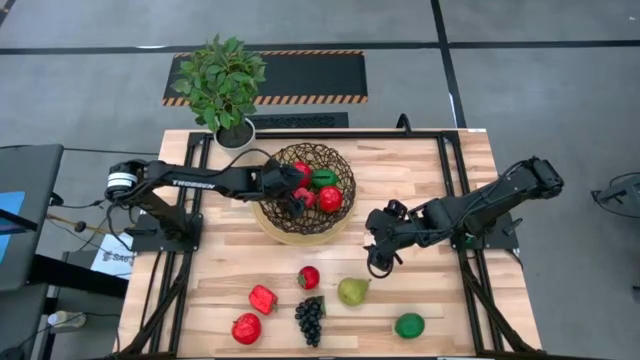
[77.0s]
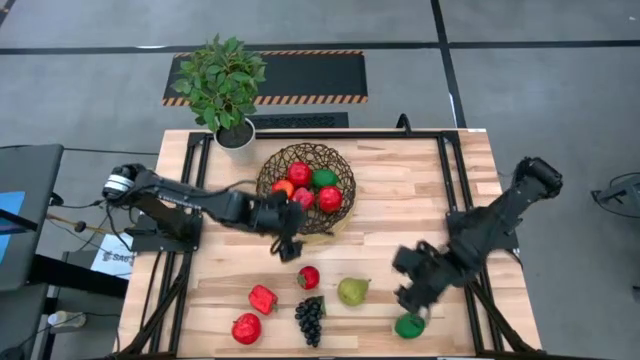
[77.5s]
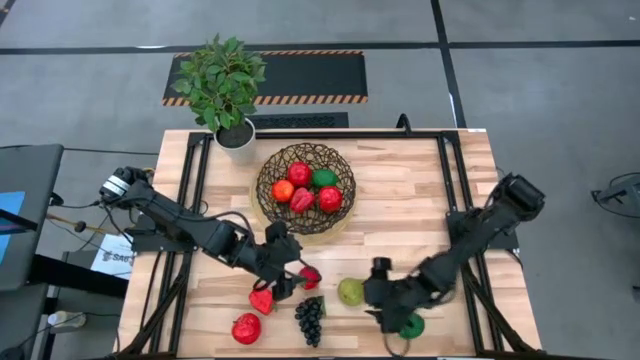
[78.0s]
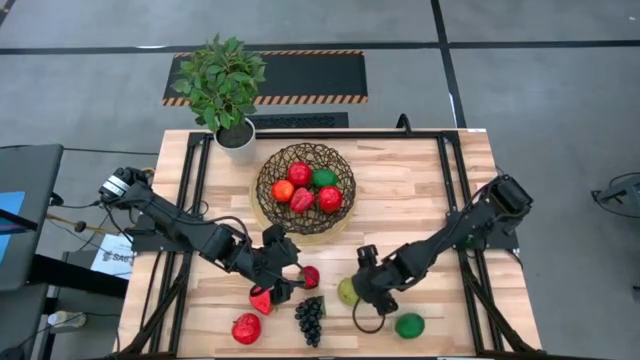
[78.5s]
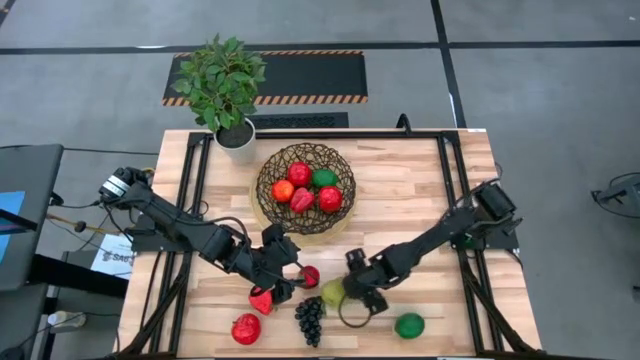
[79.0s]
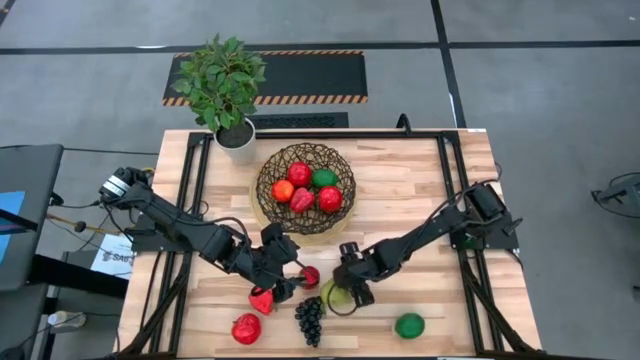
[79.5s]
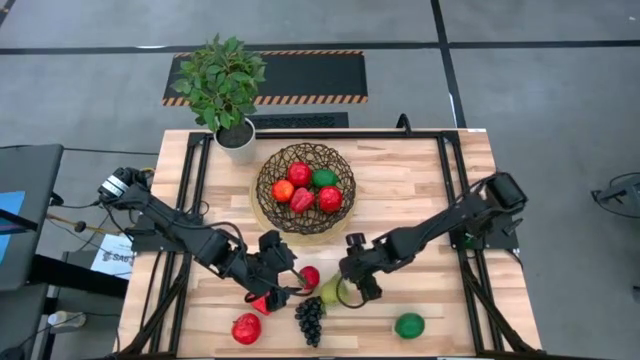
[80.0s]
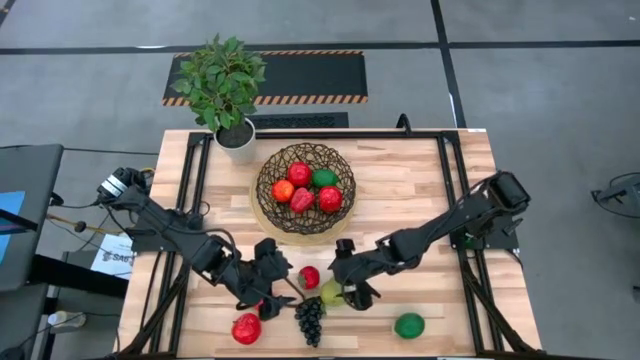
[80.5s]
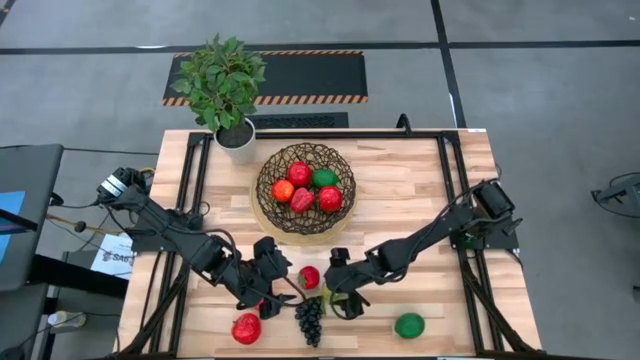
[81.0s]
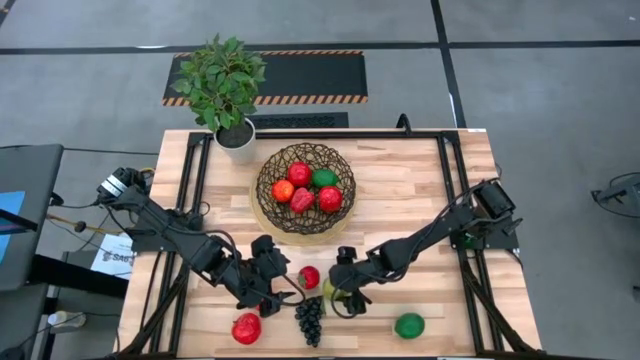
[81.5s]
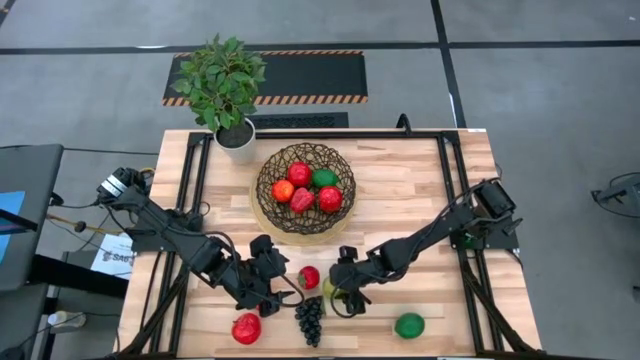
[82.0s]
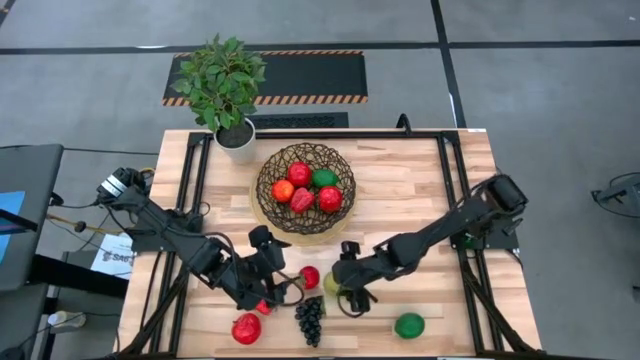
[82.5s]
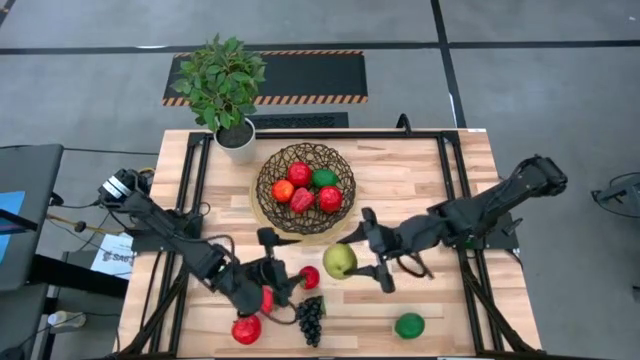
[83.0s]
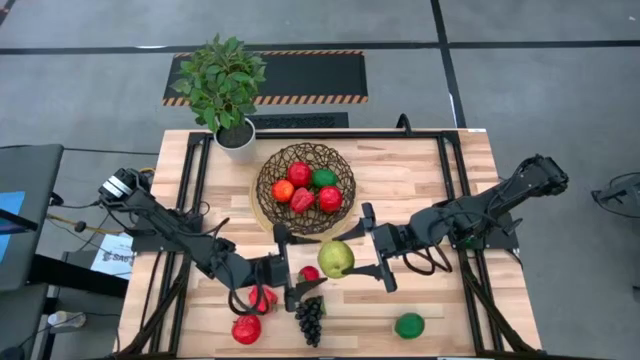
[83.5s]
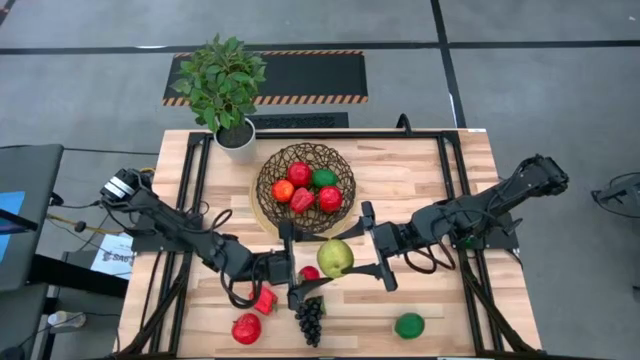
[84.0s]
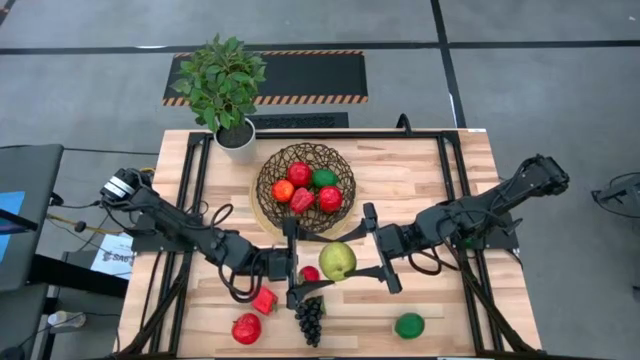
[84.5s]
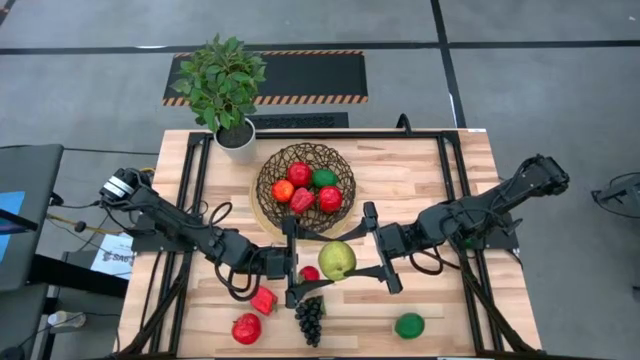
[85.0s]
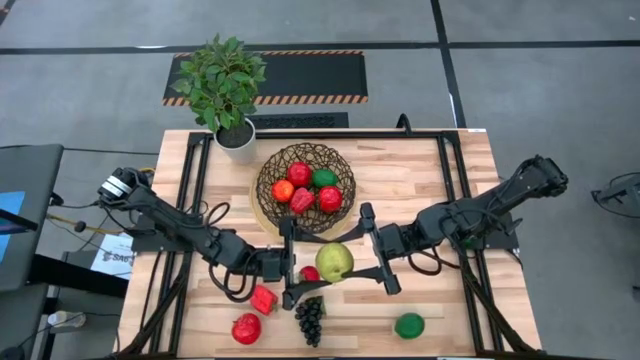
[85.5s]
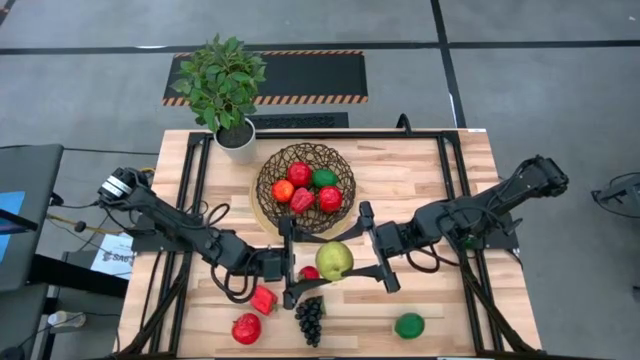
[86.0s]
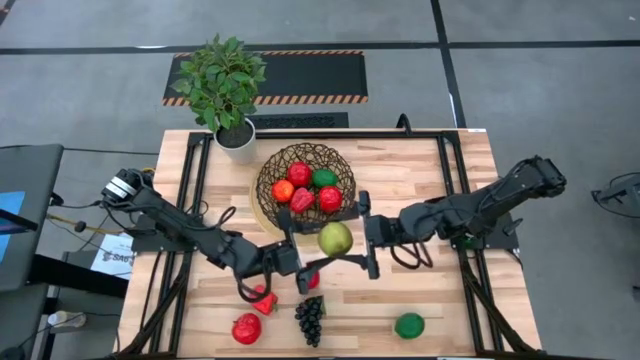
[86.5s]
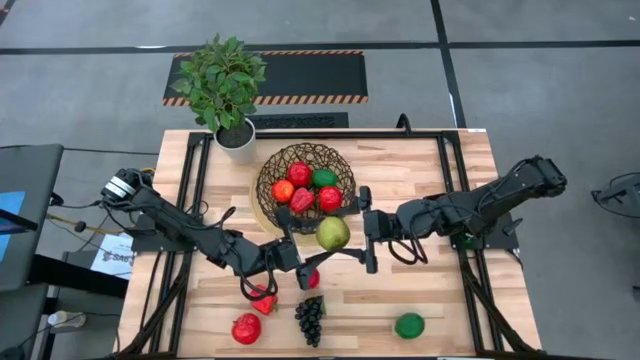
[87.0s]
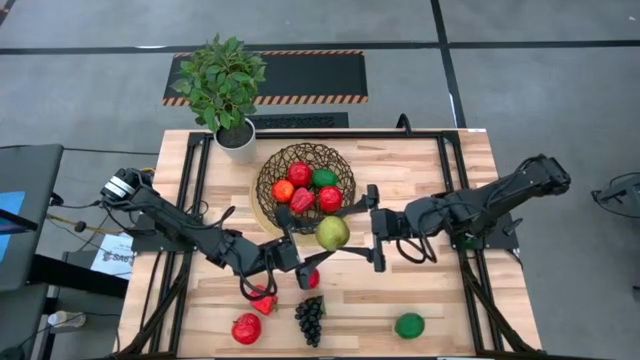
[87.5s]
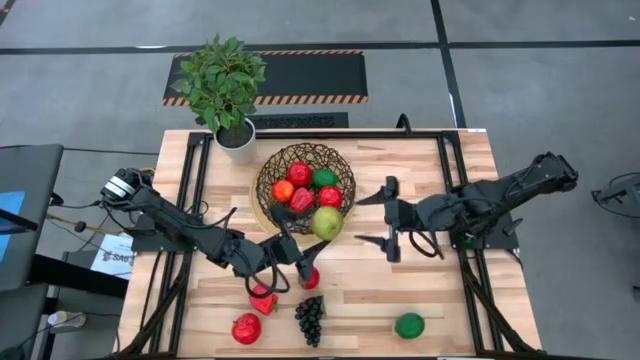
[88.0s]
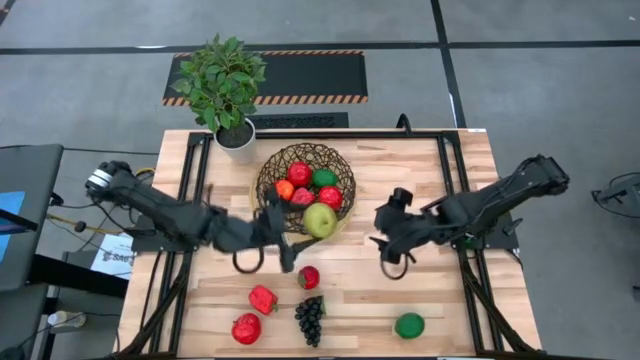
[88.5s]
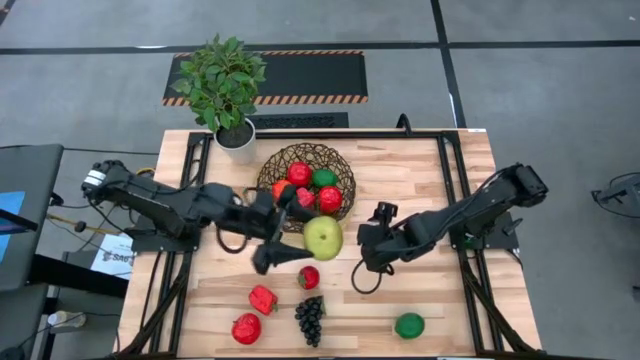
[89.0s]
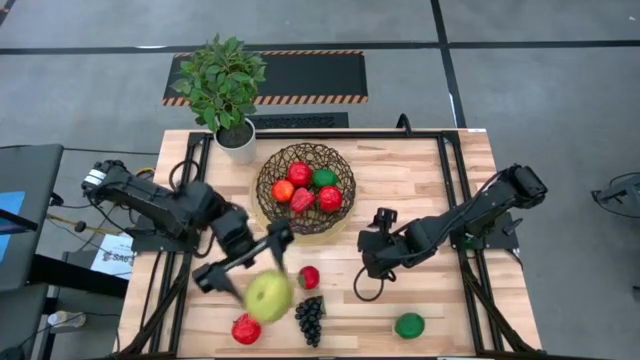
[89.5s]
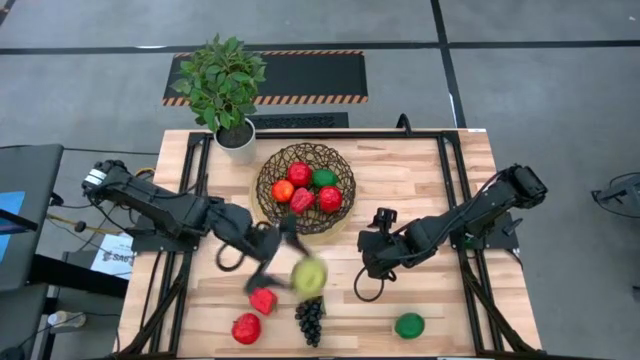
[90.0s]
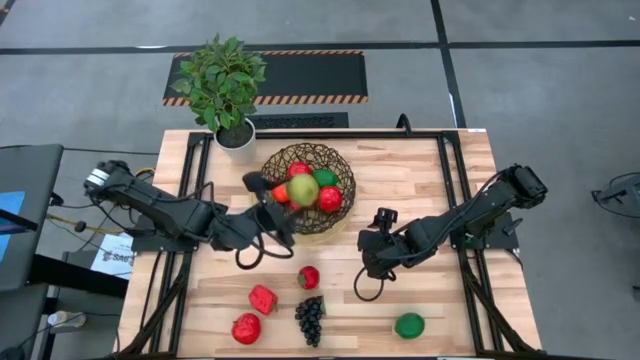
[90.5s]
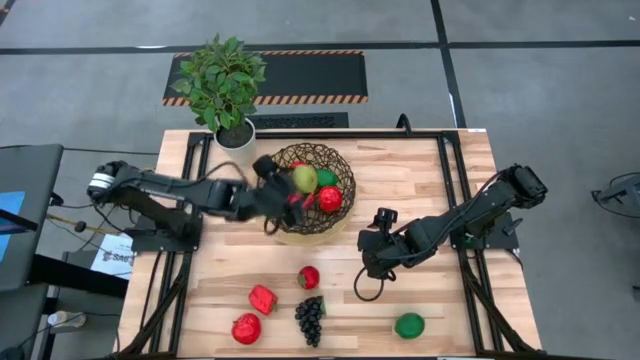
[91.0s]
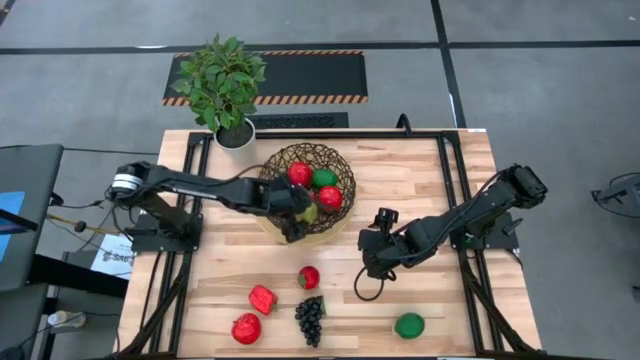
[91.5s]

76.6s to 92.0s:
Task: Build produce basket
Put the green pear into the basket

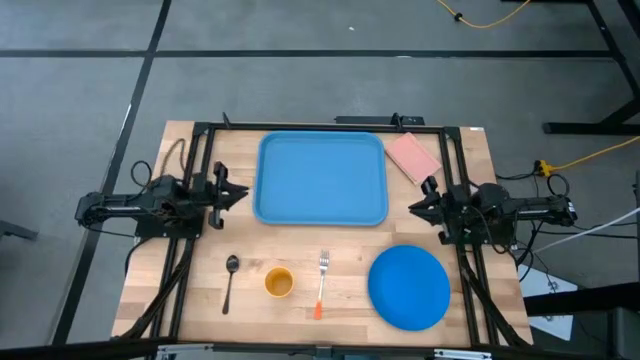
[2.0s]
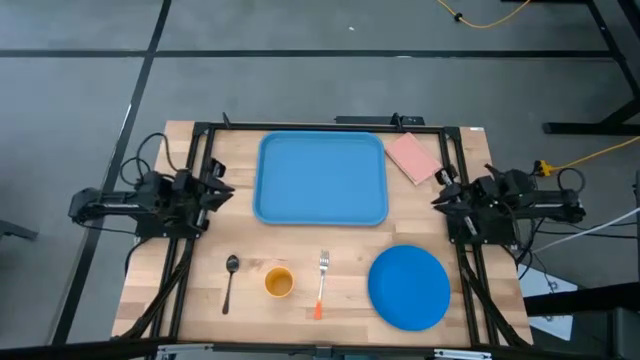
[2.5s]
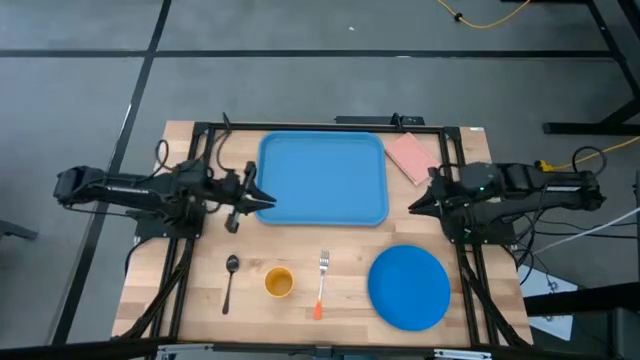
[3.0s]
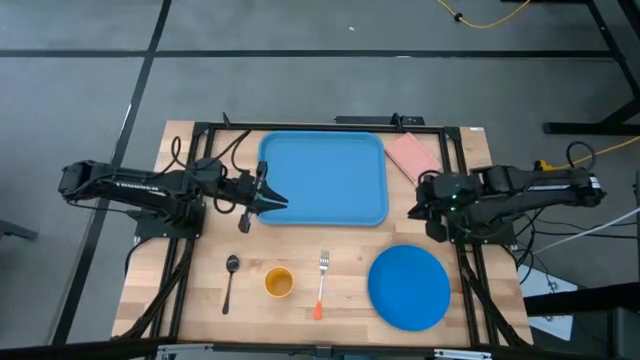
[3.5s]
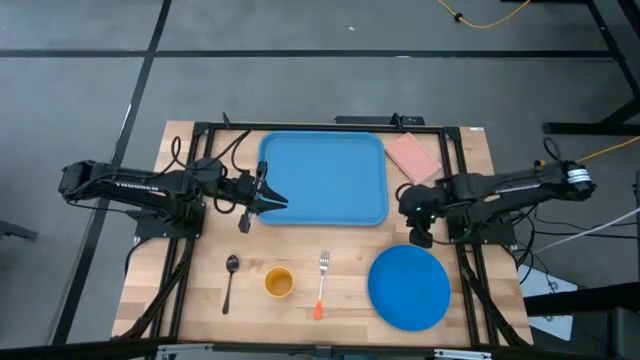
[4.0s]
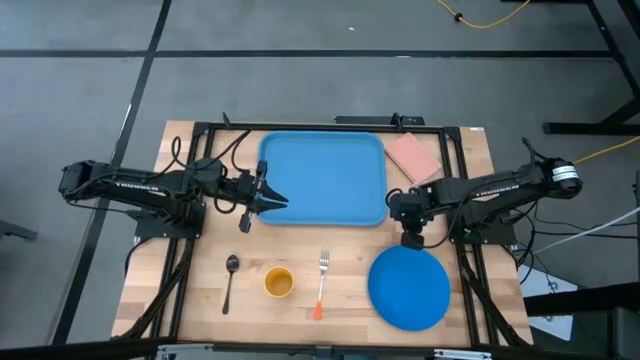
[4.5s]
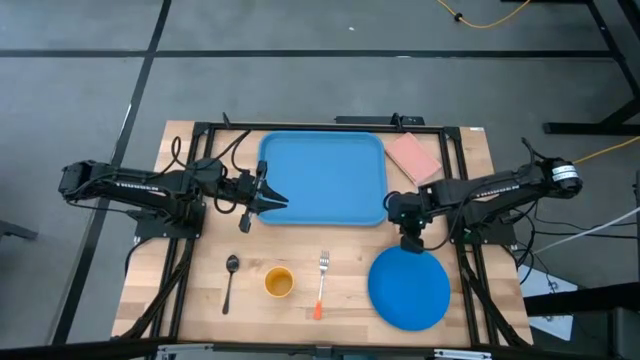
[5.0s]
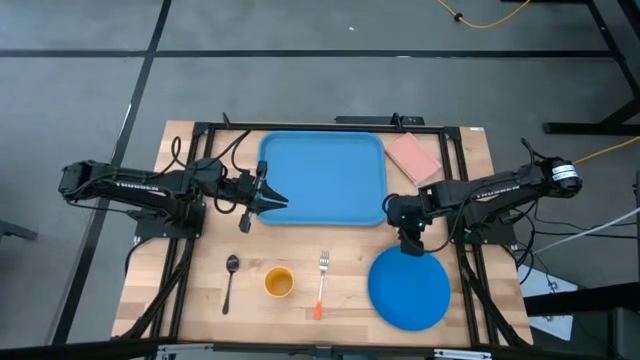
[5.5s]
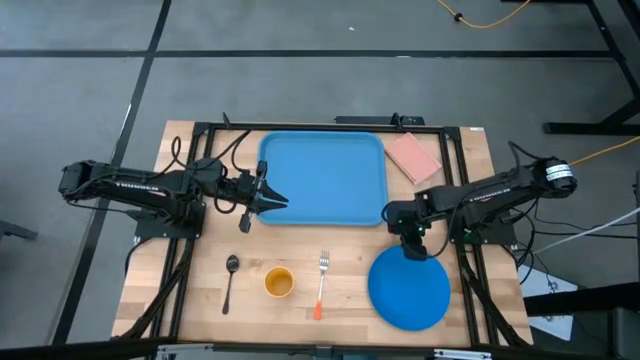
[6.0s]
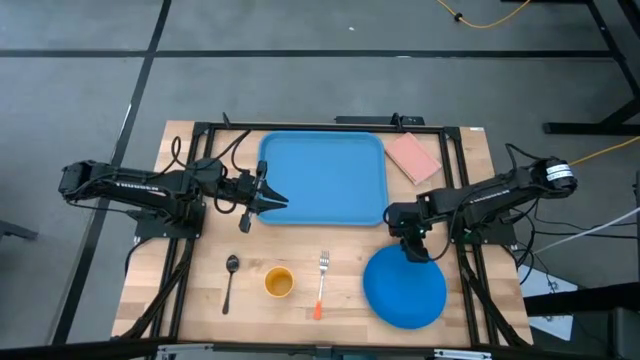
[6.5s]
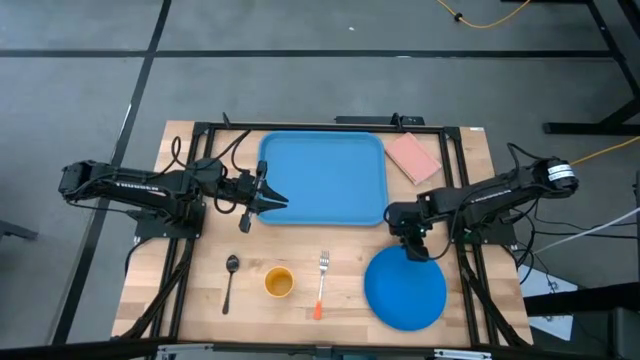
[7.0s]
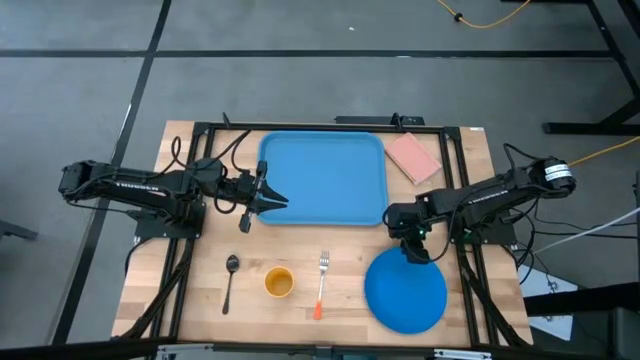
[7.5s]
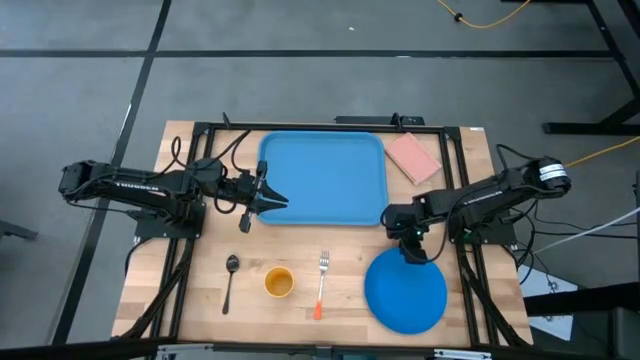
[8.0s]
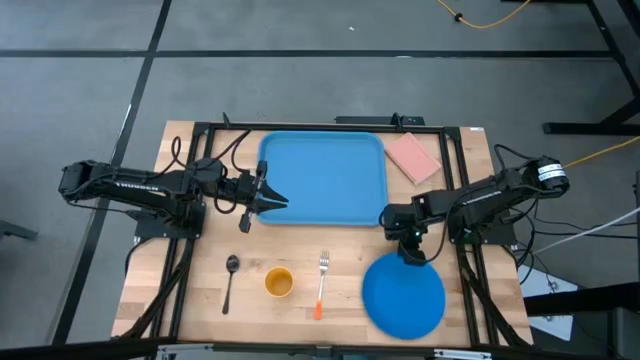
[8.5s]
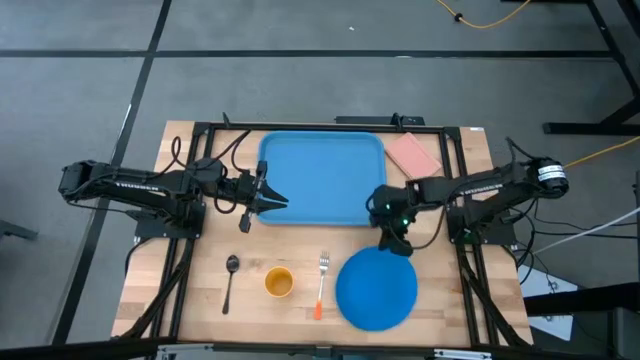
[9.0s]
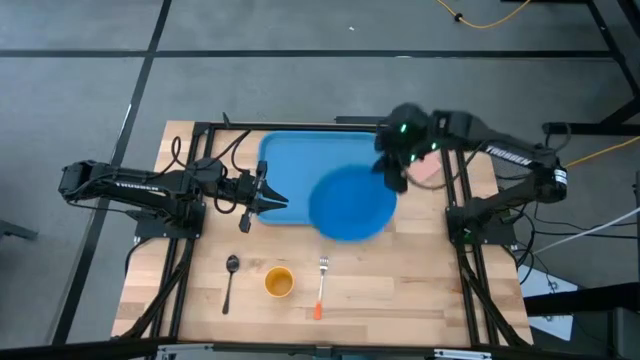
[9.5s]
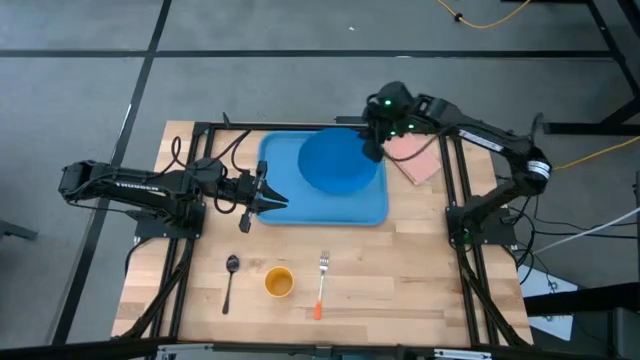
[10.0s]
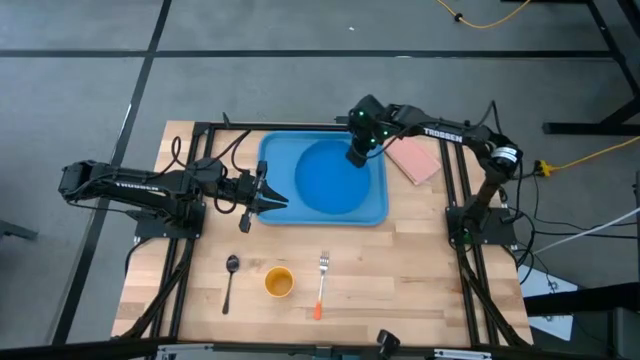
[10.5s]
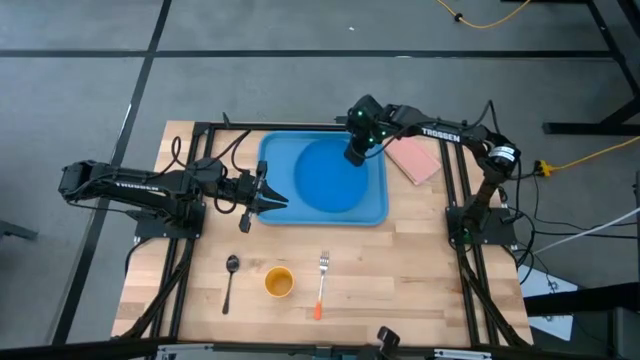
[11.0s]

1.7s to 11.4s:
Task: Pick and place plate/cup/fork/spoon on tray
Put the blue plate on the blue tray
